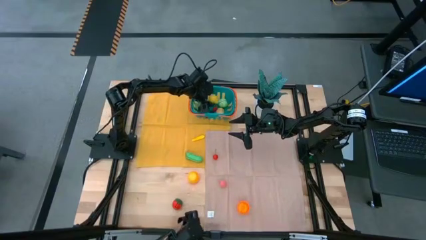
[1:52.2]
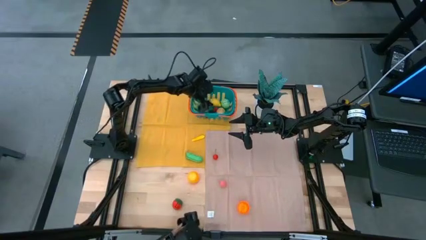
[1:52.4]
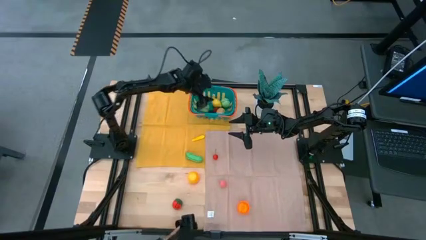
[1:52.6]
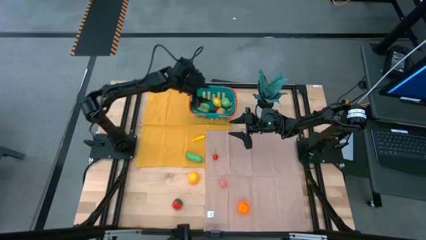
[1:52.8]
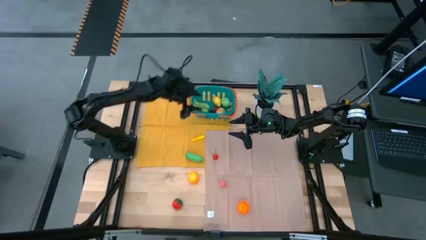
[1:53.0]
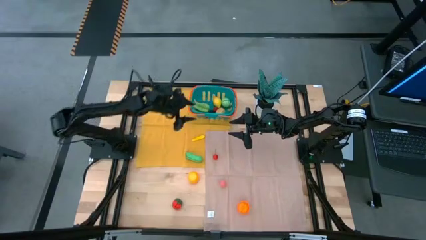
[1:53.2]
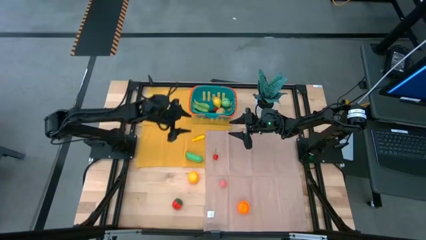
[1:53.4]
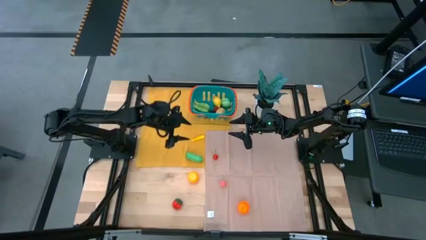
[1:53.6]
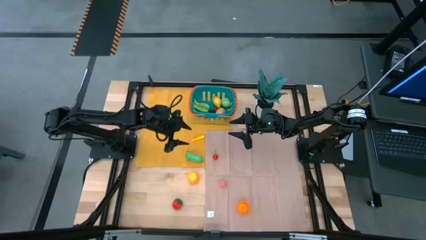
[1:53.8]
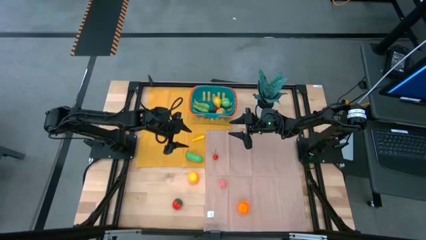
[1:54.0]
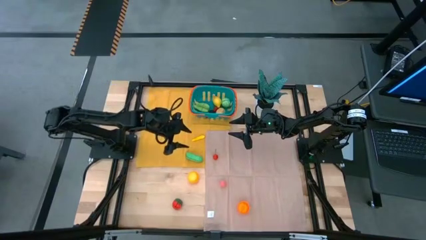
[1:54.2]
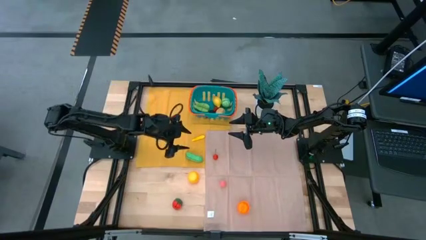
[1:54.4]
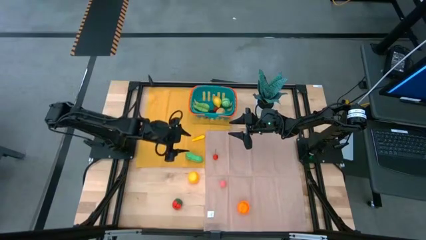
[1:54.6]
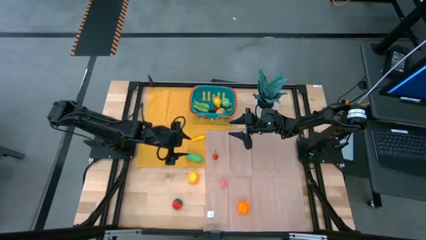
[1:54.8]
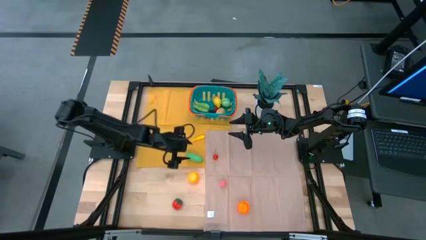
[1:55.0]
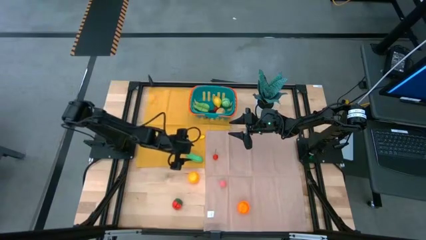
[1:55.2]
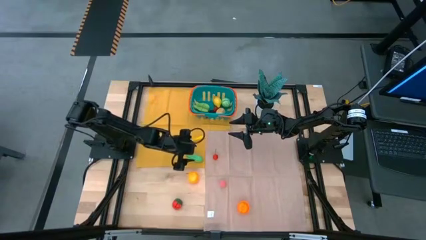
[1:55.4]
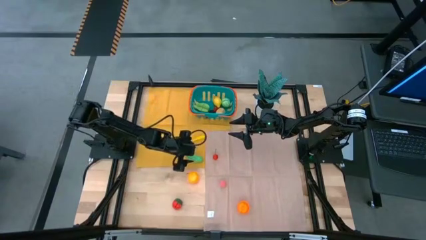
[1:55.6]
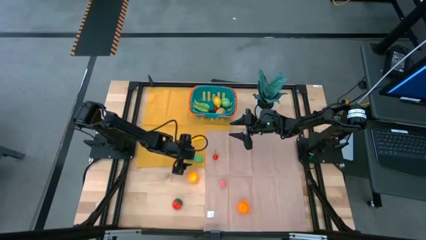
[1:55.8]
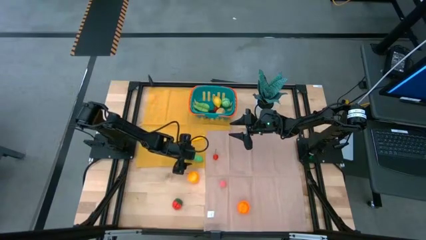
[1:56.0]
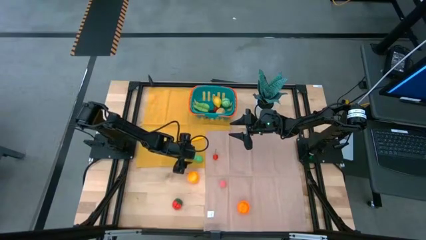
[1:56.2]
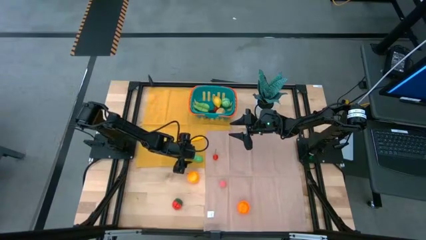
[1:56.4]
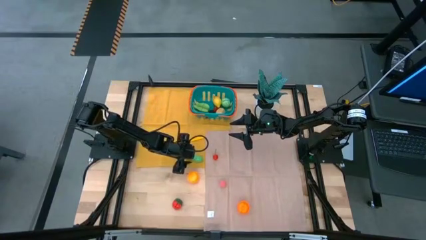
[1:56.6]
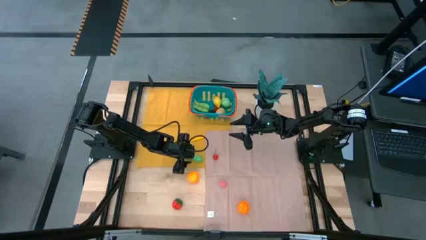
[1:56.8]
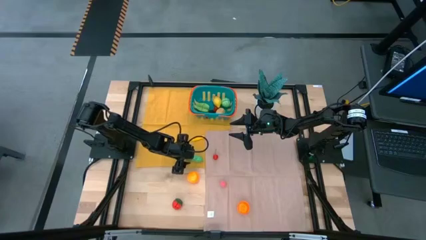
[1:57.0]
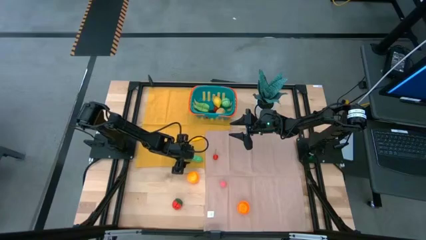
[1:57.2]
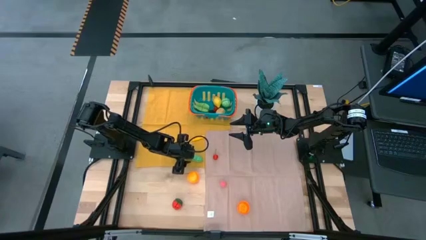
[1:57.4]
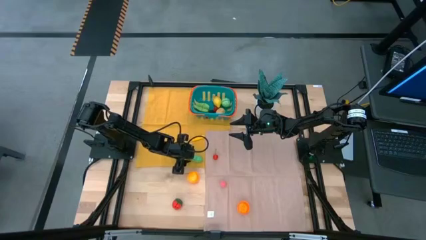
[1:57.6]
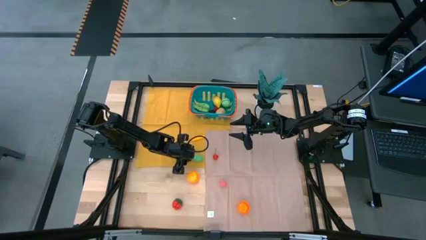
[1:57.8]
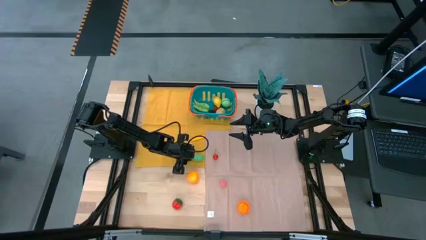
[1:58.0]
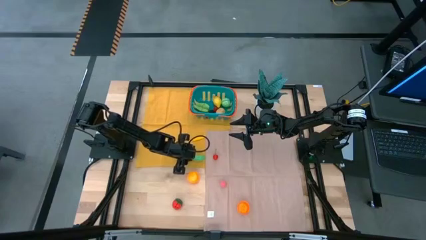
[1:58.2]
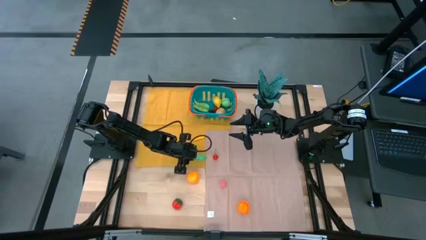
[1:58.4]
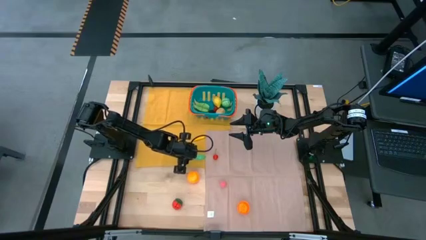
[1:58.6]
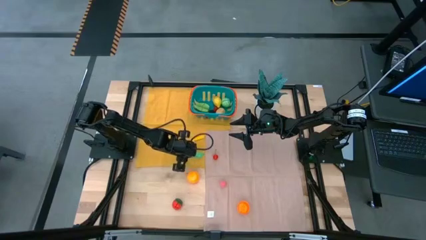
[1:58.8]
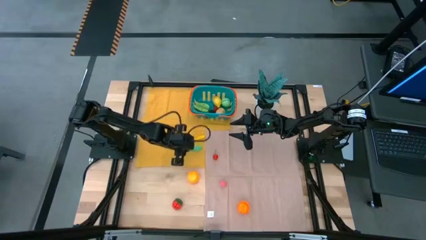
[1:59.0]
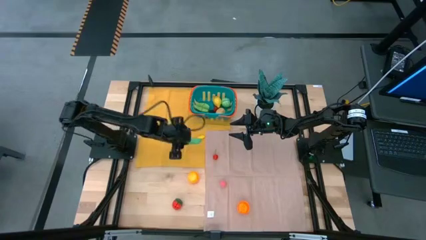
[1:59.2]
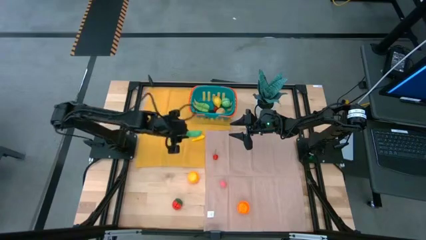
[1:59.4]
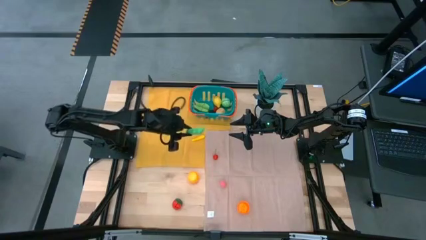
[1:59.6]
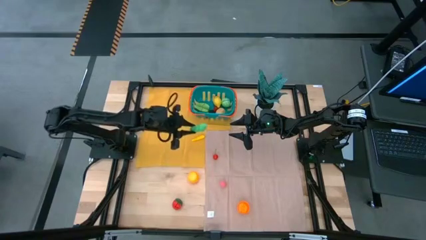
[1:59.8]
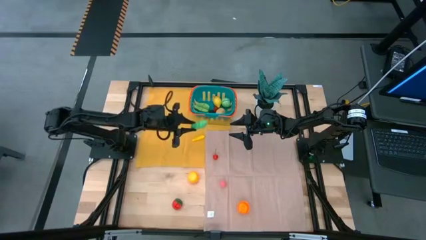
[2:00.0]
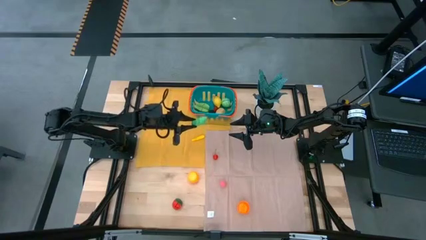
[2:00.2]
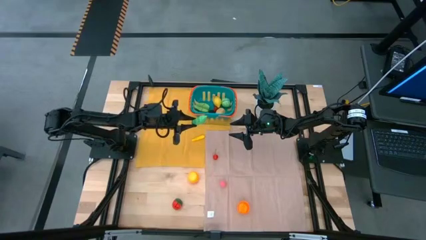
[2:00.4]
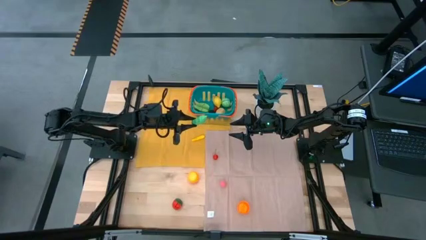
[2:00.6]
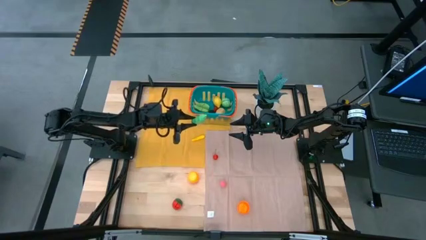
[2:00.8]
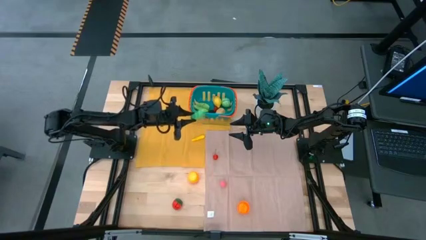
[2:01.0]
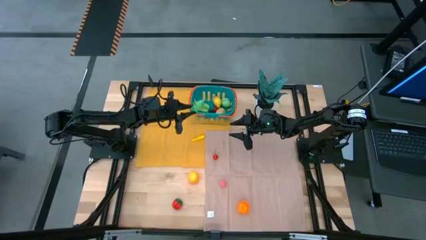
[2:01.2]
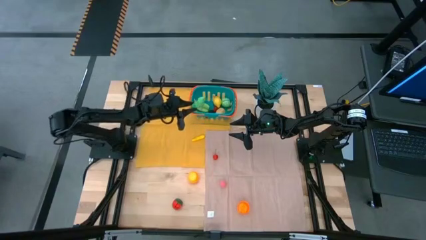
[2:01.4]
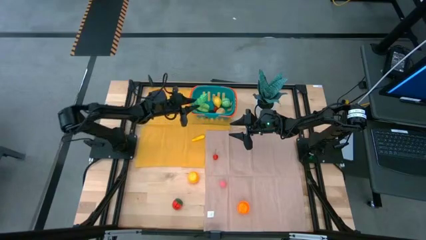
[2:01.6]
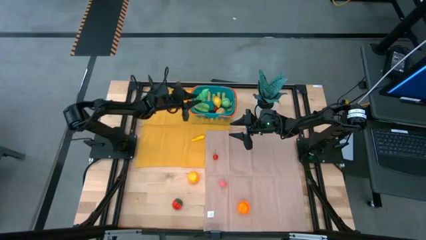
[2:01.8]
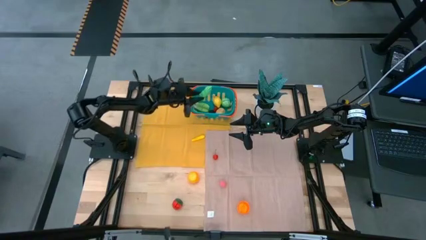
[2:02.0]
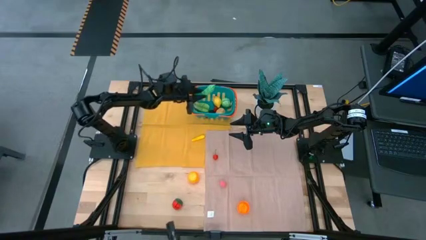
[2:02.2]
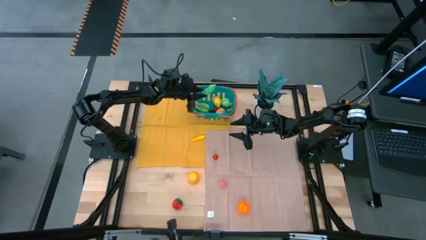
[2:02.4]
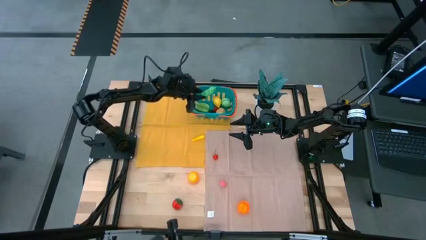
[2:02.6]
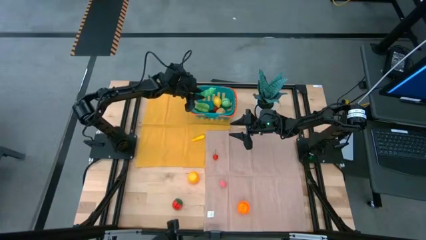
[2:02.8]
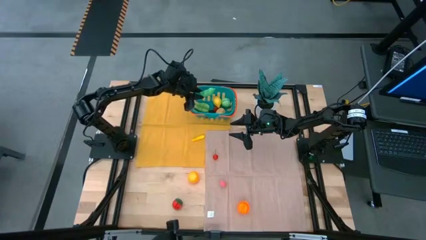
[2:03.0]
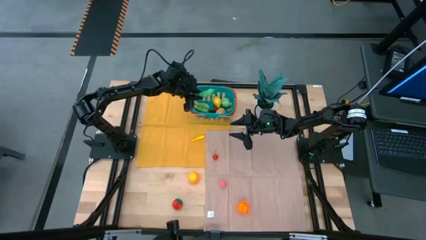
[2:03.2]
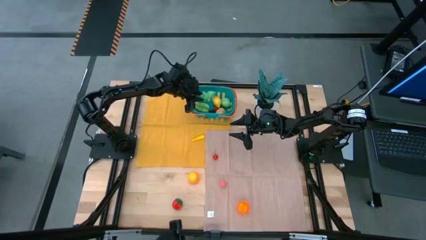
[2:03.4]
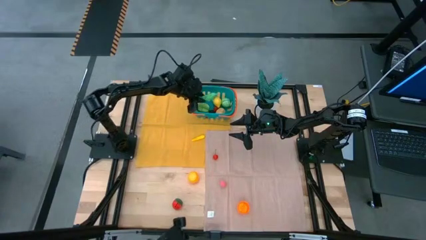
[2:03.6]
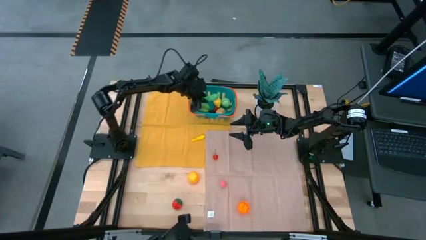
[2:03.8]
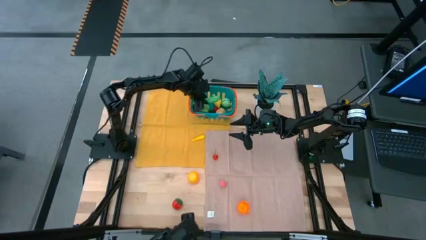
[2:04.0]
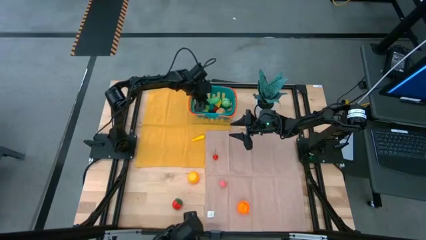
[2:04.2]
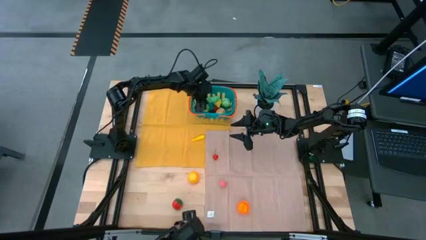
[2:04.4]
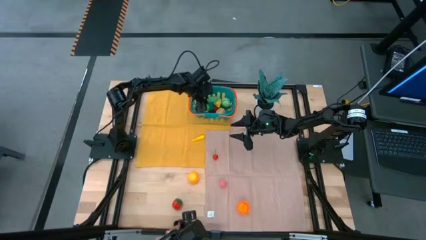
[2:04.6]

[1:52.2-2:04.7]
Task: Pick and placing Produce into tupperware
Put the green peas into the blue basket

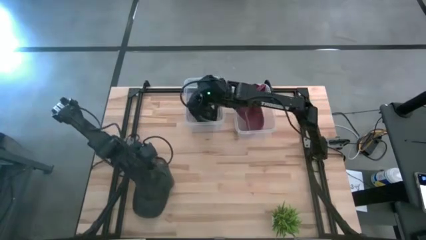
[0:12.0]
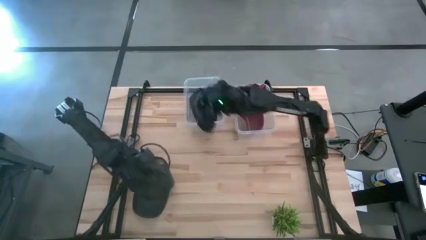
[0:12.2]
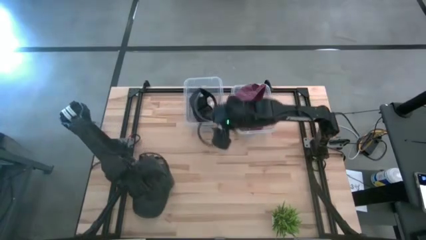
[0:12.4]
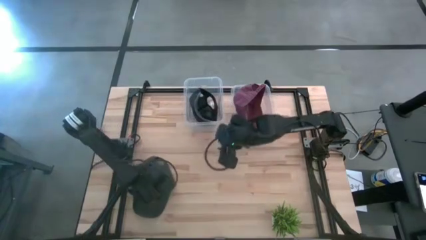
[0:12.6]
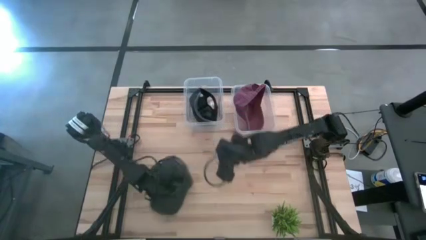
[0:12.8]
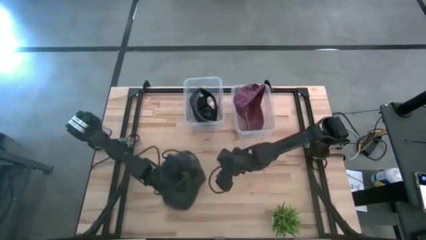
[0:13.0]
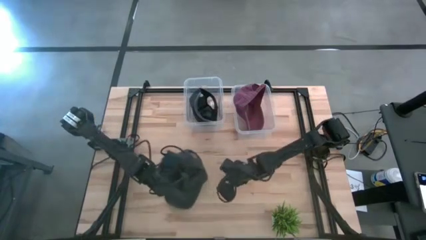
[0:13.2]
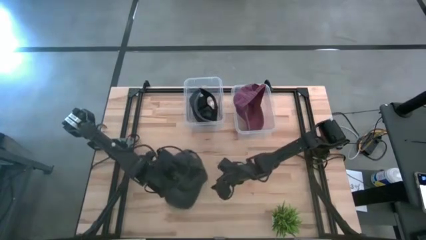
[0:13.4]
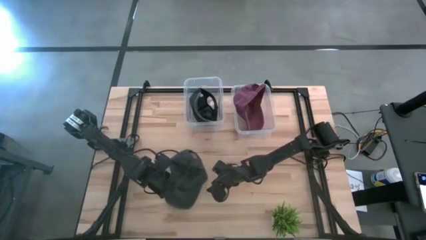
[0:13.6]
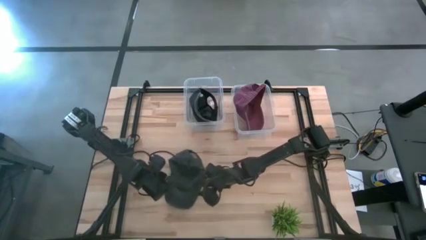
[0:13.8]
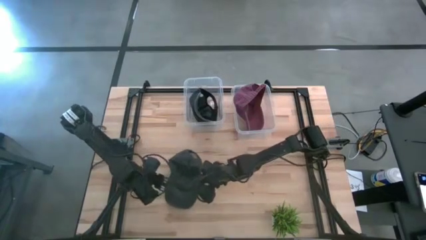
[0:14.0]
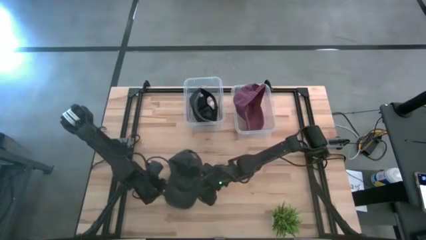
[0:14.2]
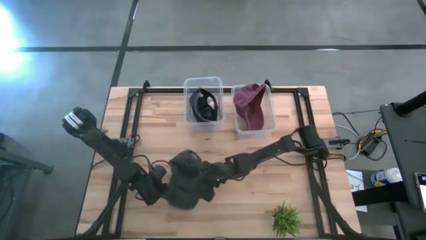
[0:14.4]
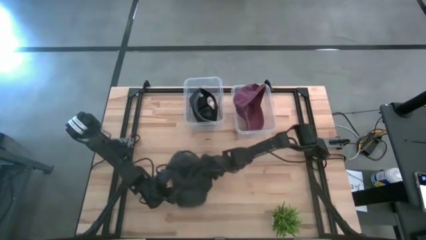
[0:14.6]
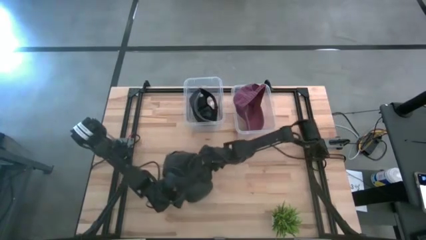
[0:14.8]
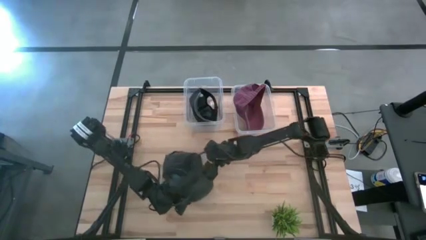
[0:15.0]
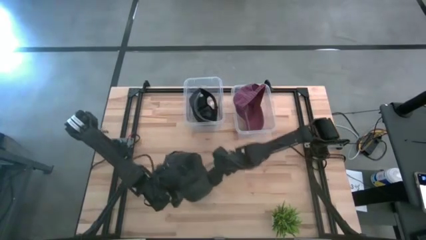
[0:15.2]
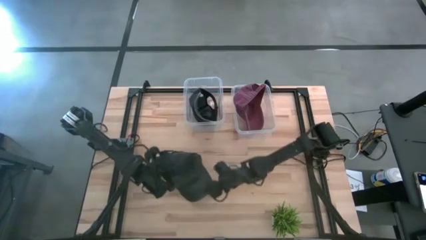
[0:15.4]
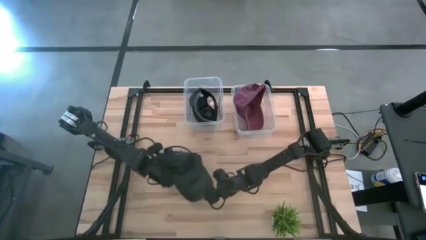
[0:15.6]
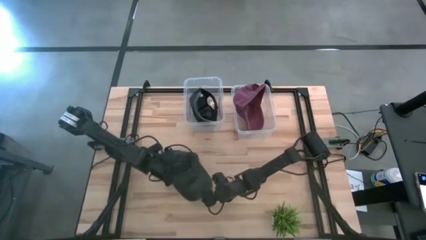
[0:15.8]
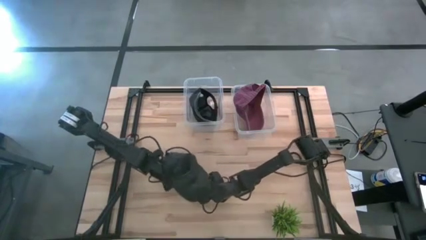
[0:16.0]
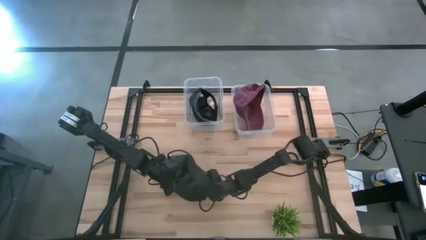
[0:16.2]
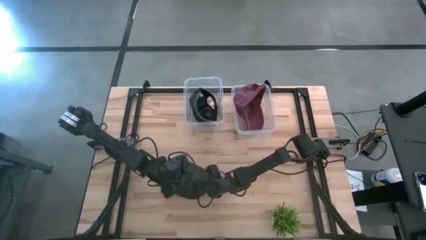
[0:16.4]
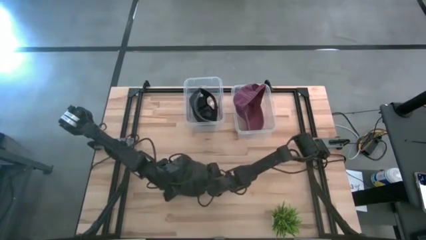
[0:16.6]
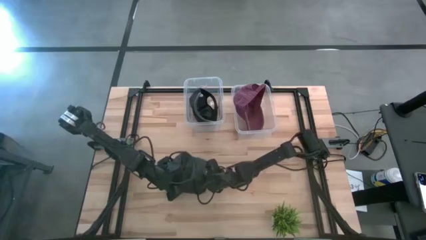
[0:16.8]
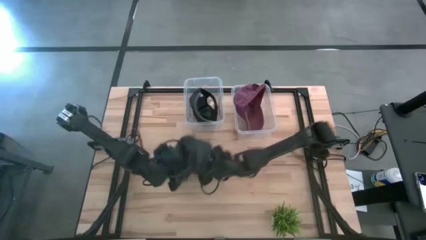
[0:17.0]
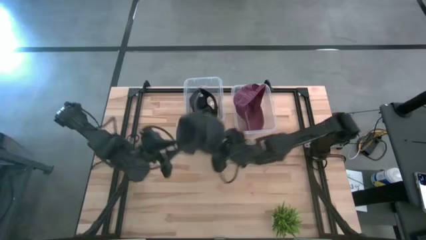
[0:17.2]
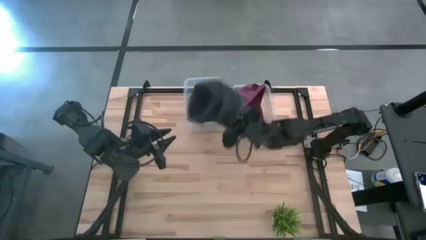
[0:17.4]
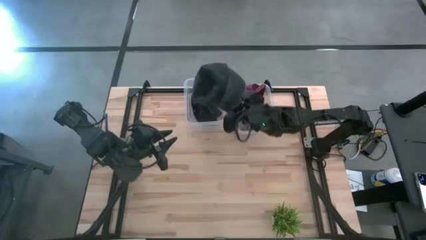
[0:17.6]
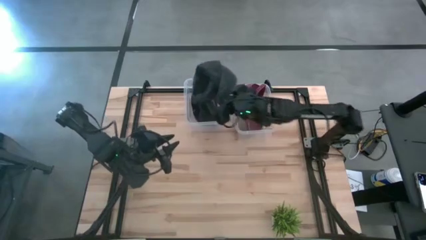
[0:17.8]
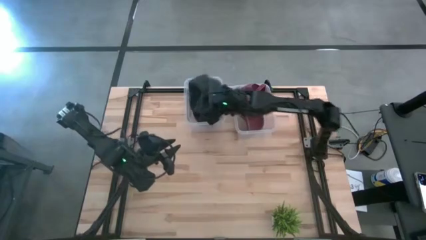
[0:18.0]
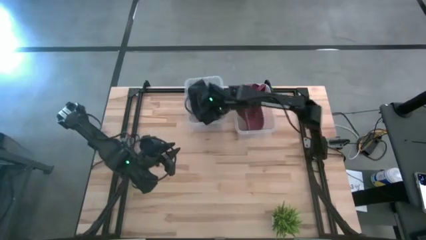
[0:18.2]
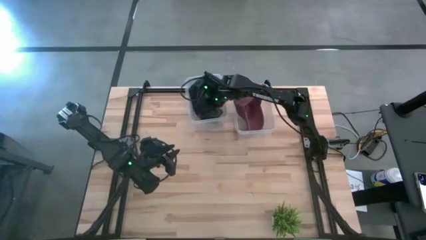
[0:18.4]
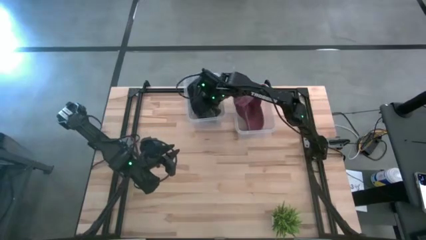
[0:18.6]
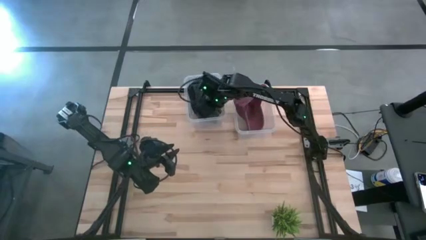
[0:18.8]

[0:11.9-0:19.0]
Task: Pick & Place hat
Put the black cap into the left transparent bin
